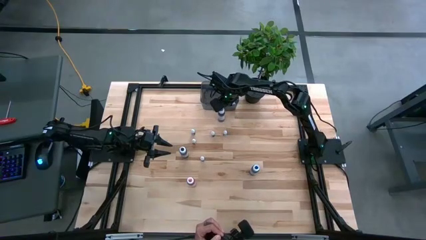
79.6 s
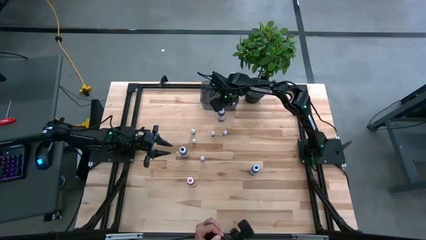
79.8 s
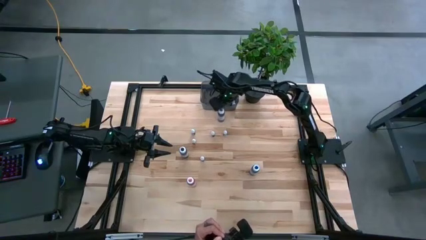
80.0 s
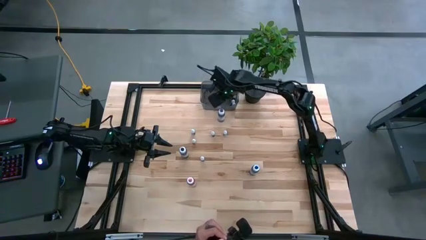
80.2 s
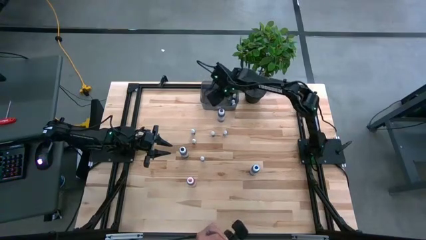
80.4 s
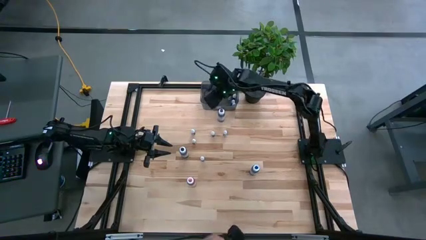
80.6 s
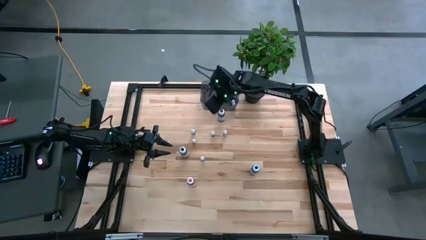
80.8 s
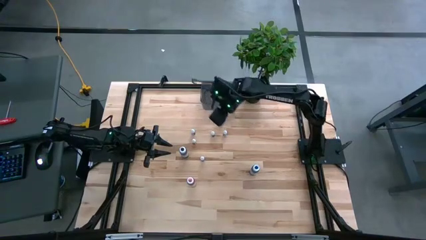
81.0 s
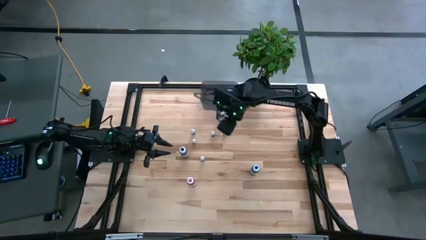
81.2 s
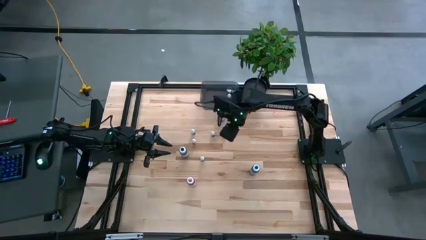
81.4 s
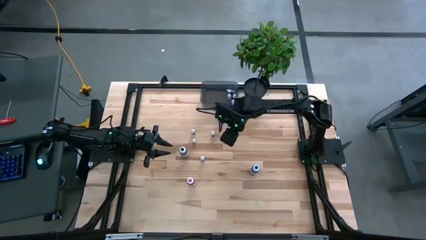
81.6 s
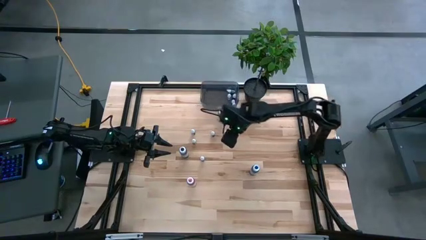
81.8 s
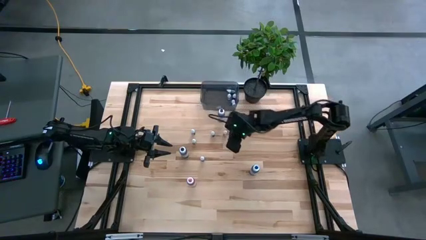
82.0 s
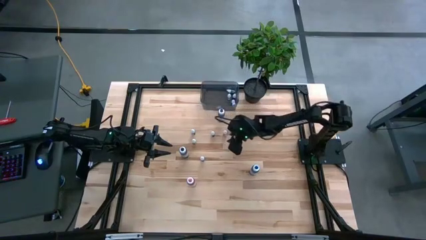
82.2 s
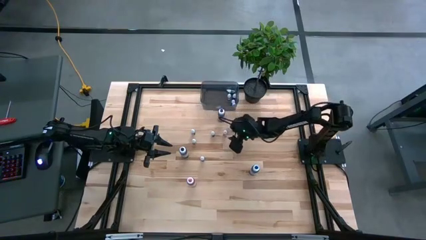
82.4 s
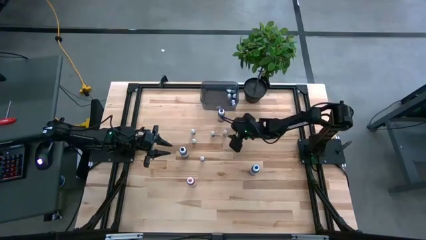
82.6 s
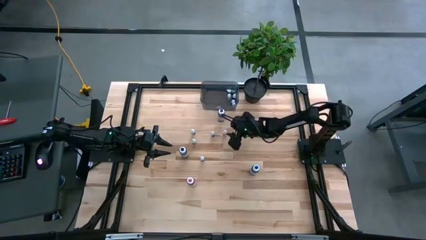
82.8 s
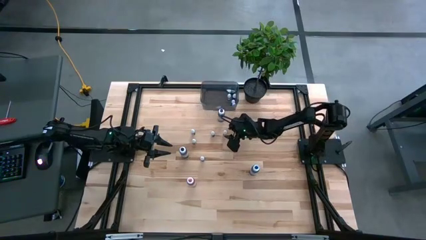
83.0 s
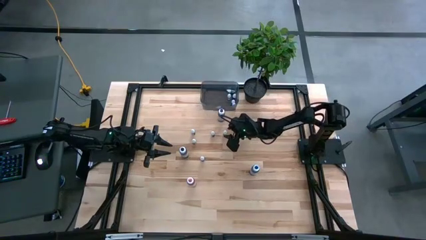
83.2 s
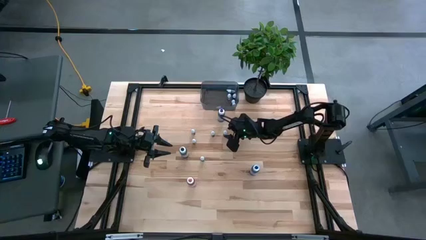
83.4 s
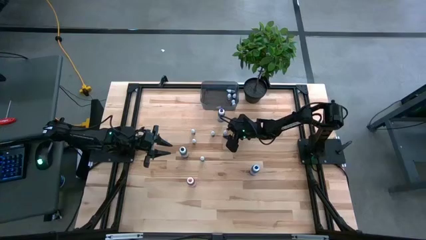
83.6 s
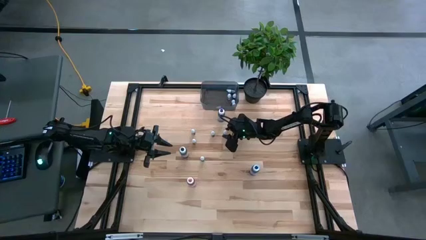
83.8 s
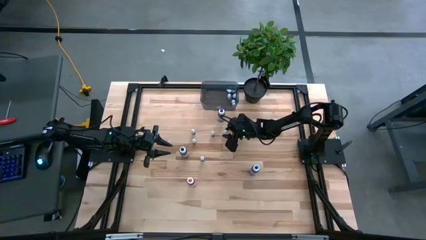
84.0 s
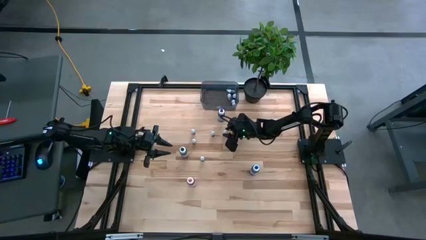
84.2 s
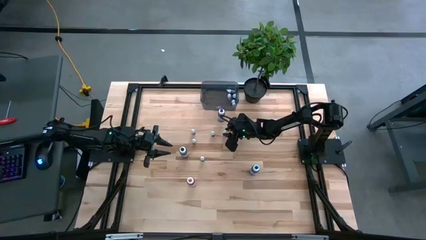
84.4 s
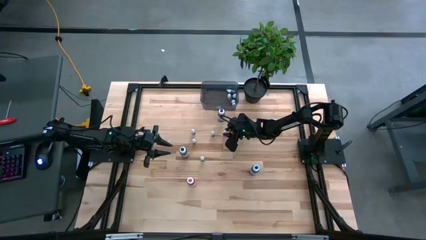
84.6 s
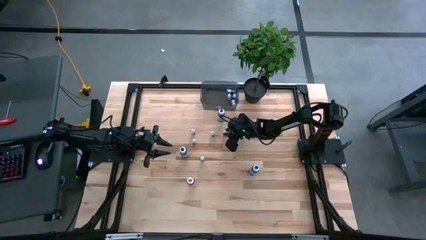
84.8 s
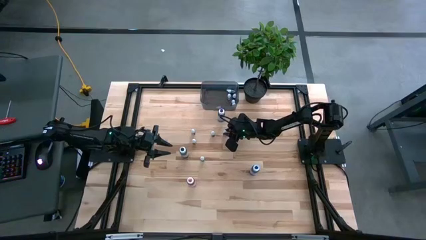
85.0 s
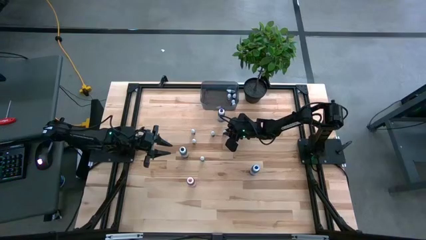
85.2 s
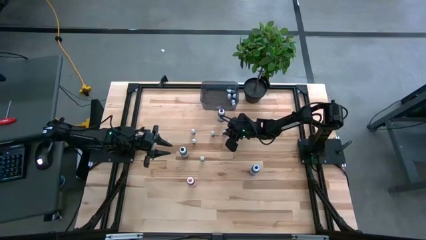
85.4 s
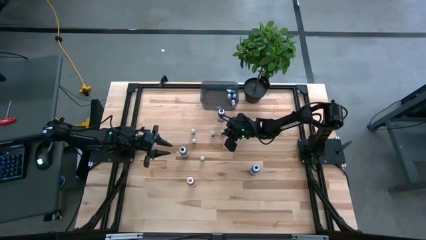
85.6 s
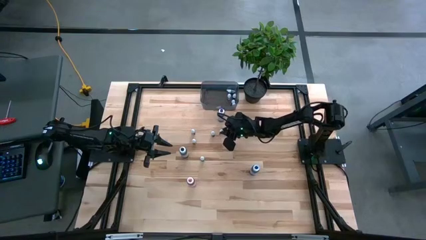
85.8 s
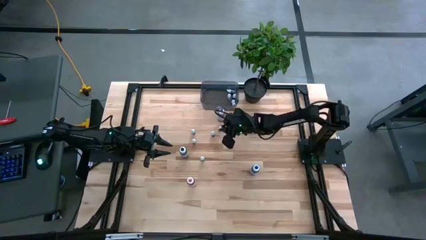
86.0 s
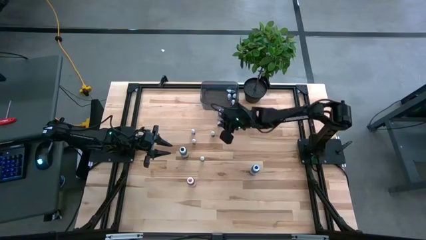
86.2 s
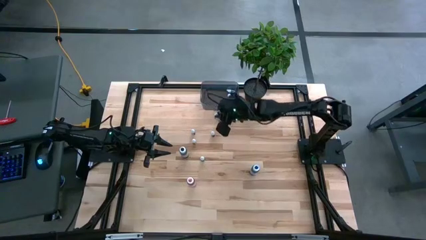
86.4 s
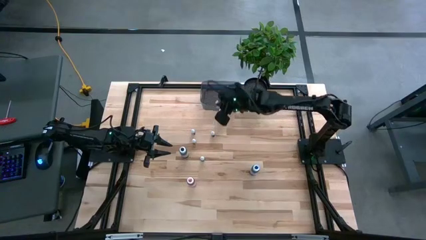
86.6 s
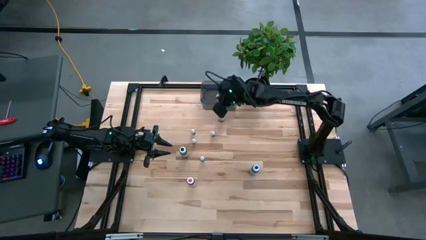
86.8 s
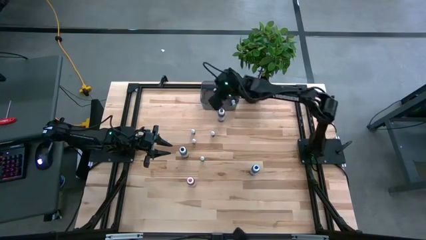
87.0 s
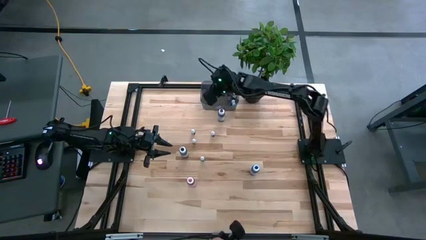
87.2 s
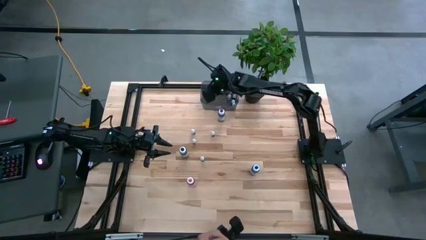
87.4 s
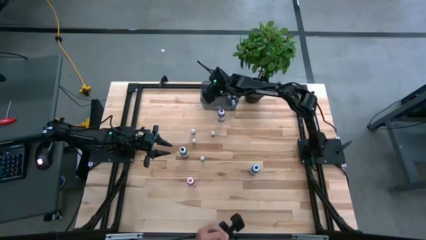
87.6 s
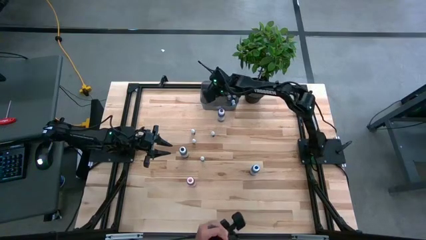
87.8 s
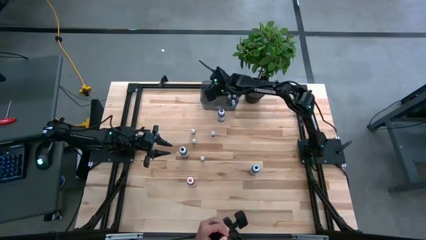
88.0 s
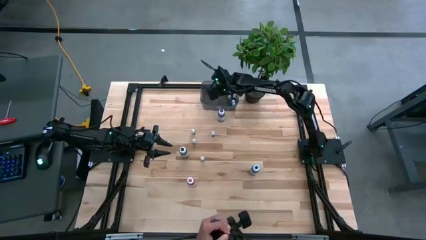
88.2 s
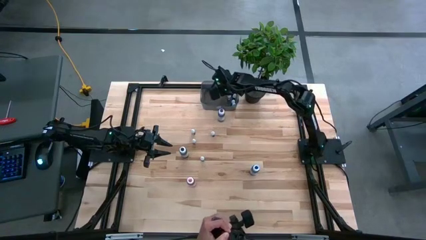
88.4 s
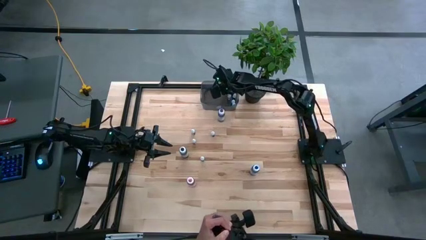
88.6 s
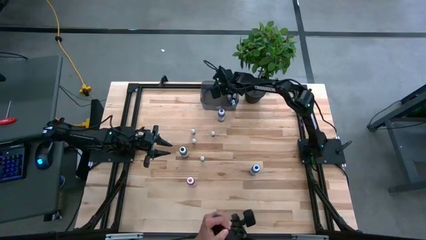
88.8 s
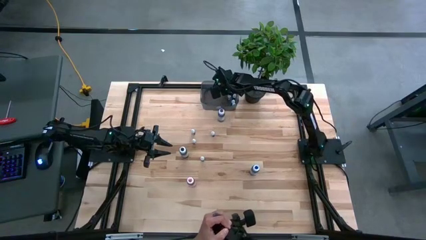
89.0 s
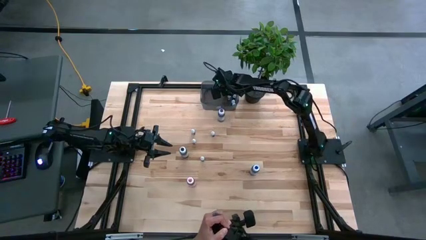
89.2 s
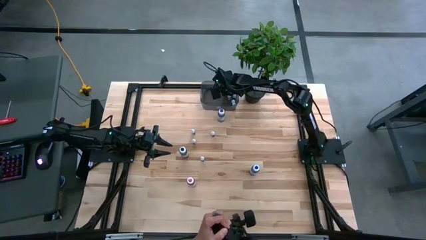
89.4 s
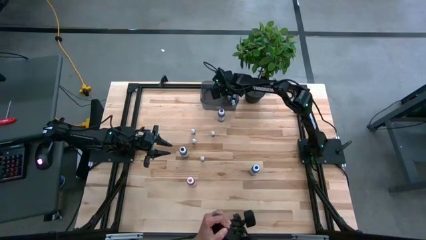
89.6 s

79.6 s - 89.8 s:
Task: Pick & Place food coloring
Put the right small red food coloring bottle into the black bin

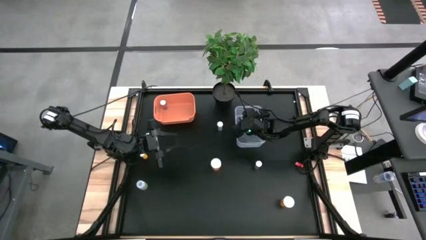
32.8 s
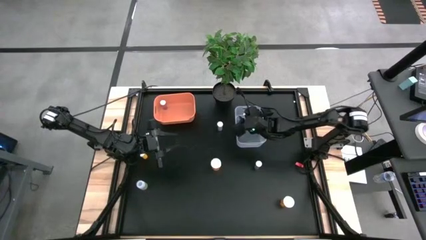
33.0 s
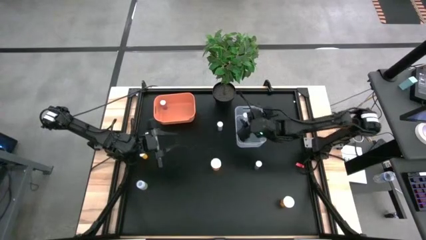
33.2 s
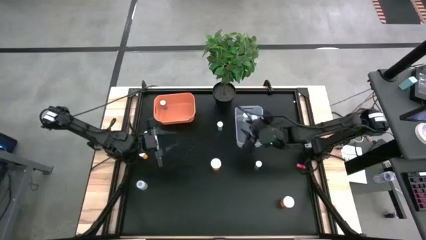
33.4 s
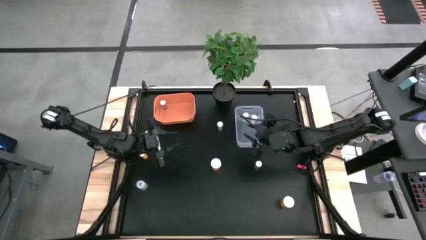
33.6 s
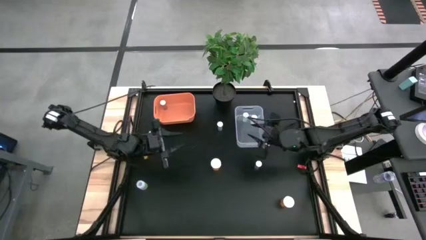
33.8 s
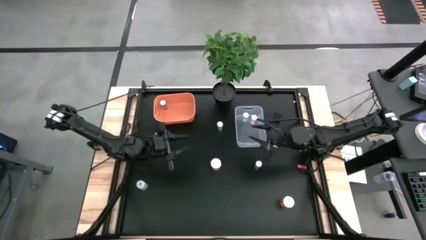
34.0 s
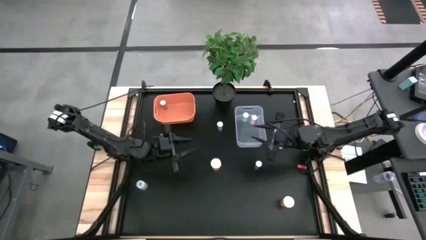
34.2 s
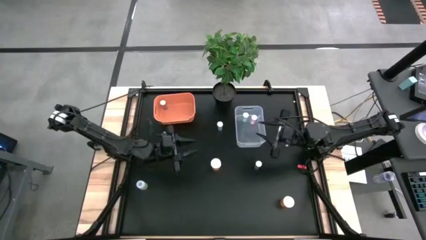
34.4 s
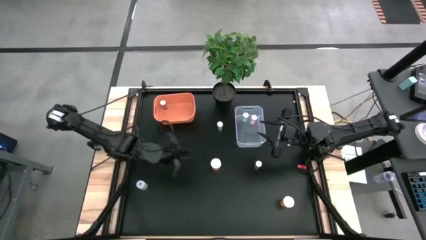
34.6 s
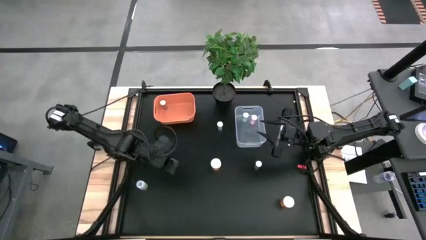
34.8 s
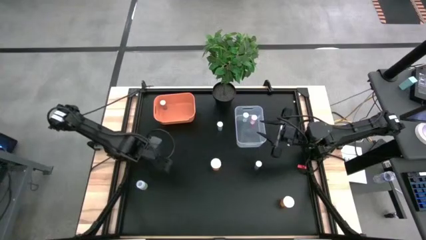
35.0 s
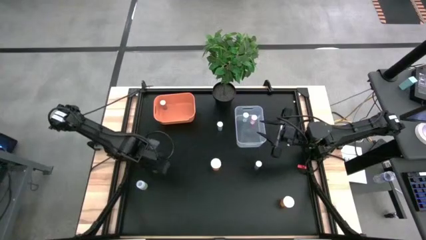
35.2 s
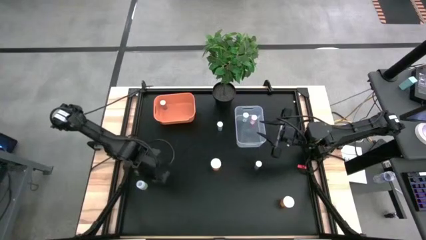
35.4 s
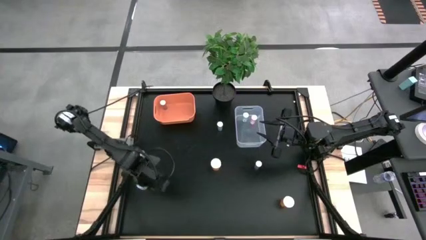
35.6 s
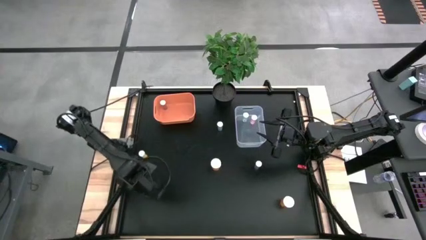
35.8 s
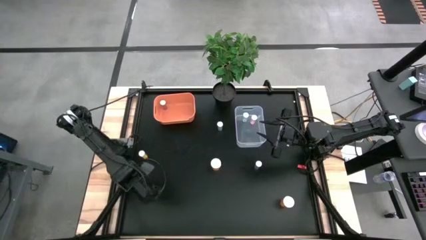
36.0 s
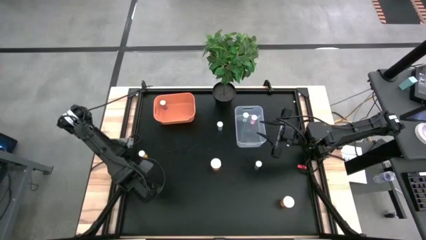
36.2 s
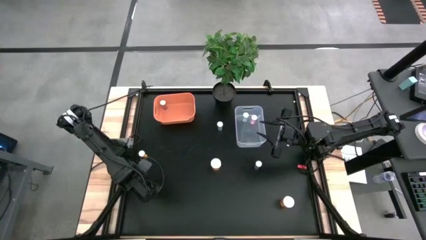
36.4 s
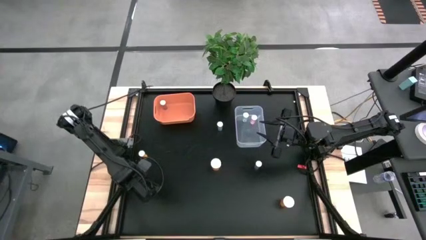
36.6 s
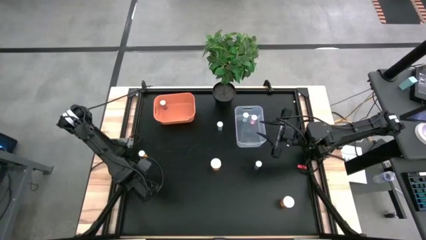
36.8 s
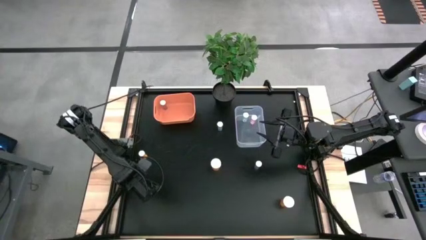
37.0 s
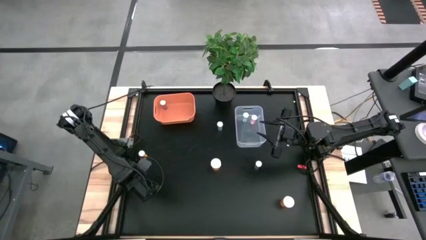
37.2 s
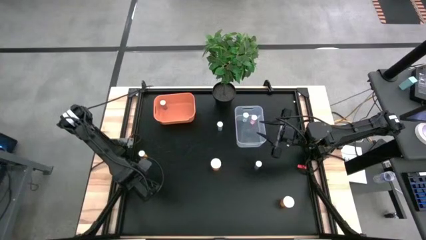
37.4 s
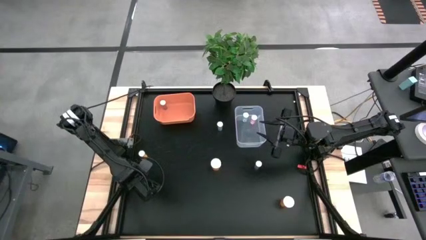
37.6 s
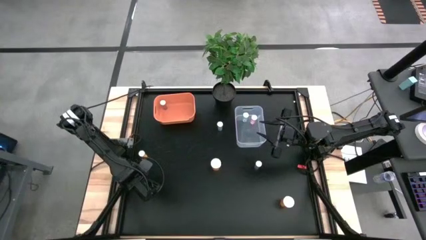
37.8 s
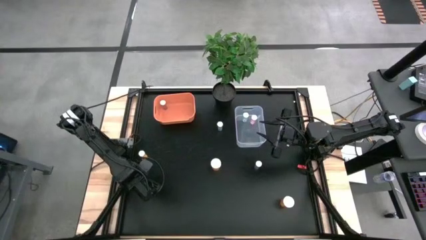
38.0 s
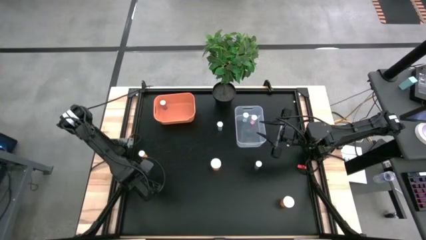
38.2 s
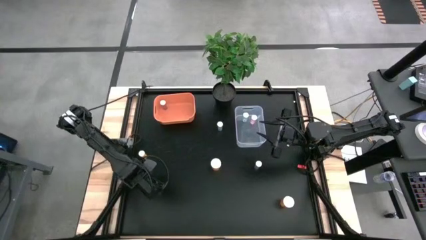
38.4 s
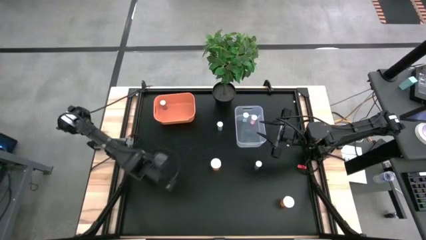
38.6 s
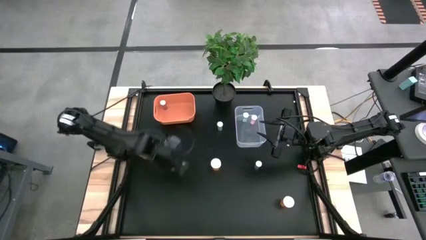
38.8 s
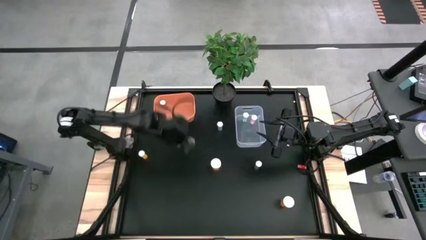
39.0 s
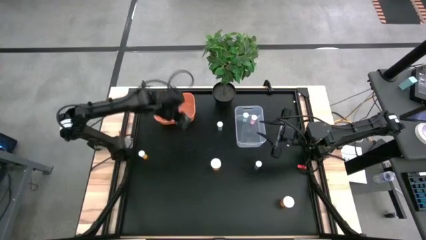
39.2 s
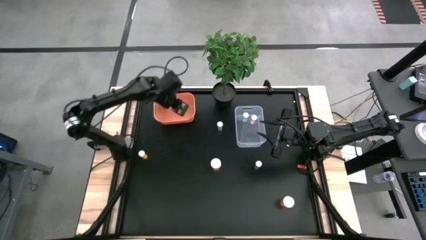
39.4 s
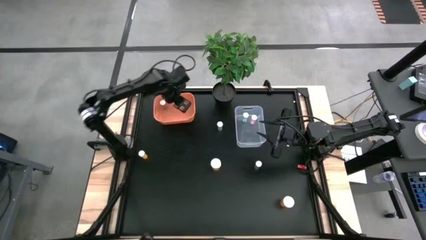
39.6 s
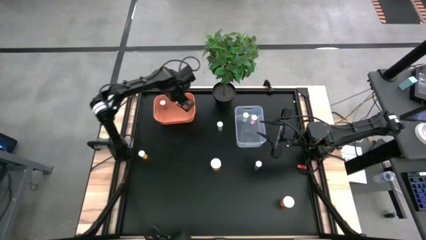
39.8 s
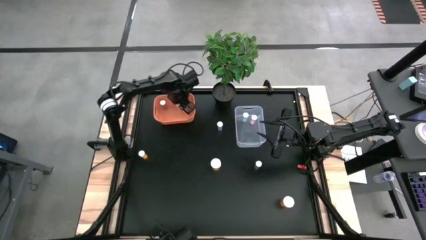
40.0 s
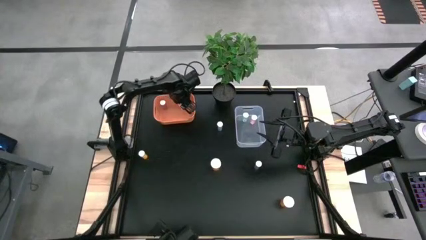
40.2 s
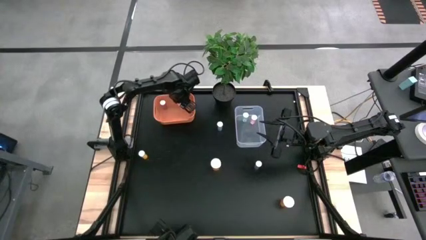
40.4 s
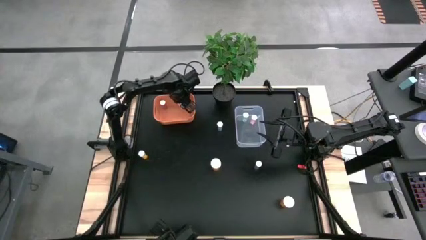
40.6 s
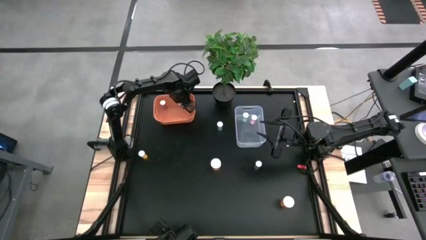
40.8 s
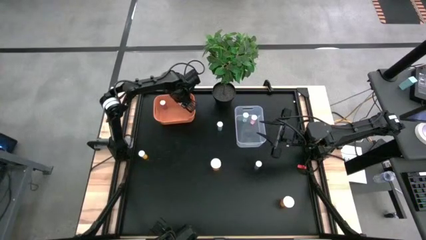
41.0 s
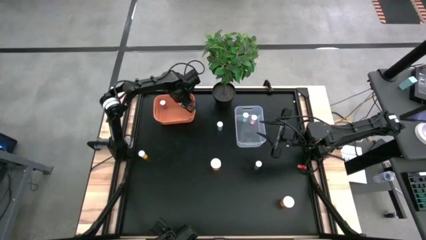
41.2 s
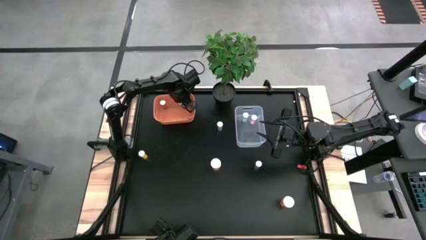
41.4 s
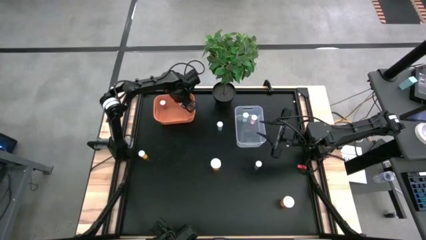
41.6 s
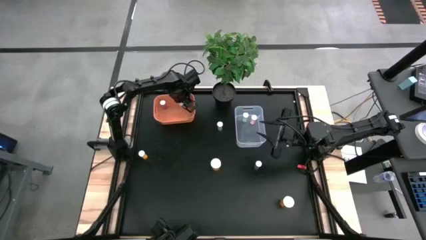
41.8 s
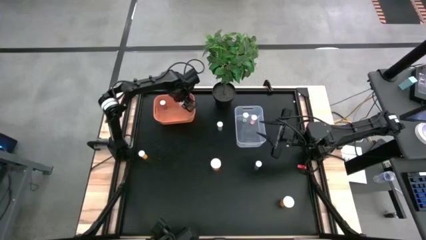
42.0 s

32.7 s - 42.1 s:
Task: Pick and place medicine bottles into bin by pill shape (circle, oval)
Put the white tablet pill bottle into the orange bin
